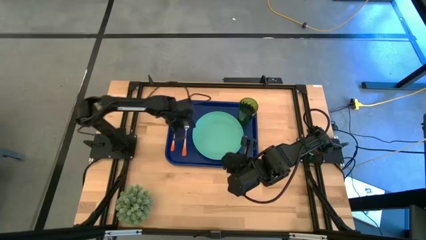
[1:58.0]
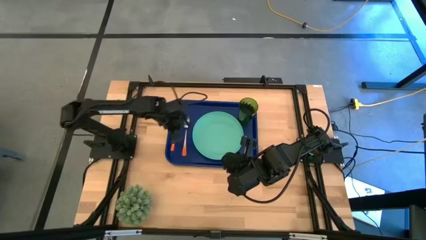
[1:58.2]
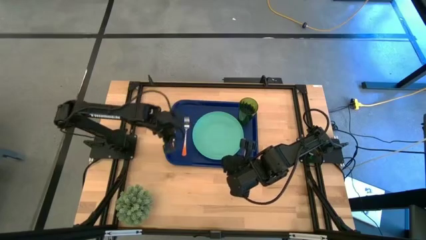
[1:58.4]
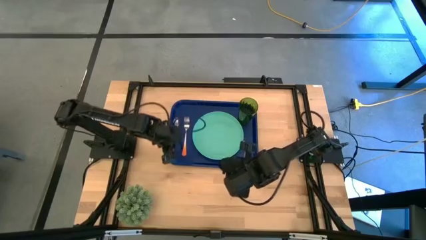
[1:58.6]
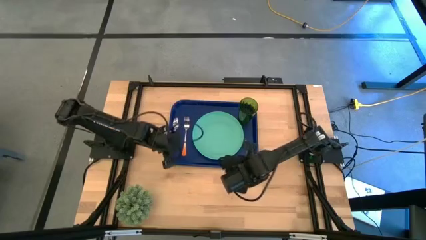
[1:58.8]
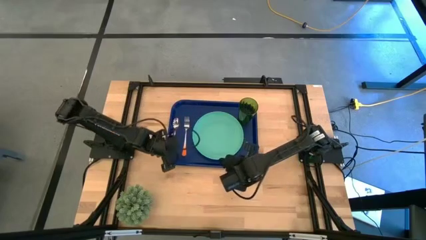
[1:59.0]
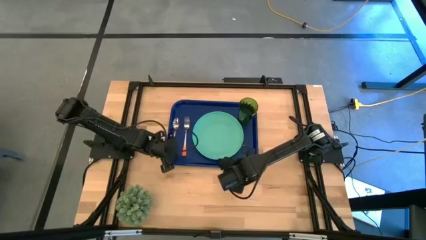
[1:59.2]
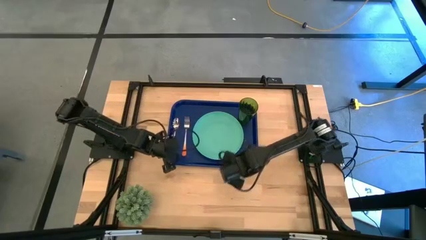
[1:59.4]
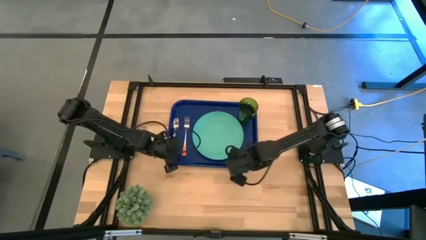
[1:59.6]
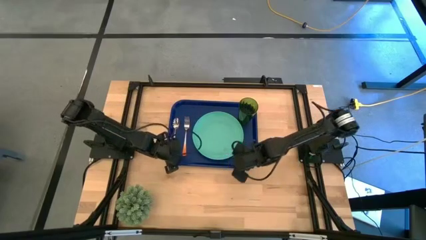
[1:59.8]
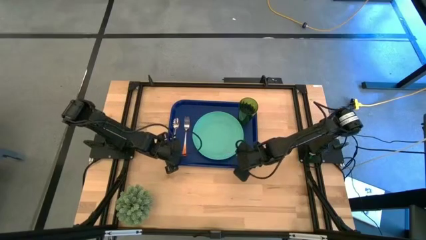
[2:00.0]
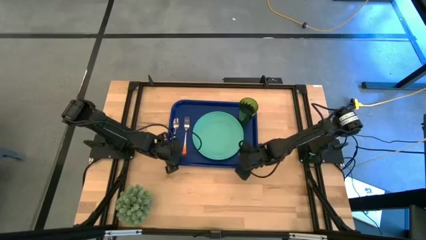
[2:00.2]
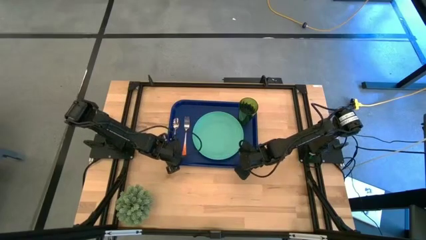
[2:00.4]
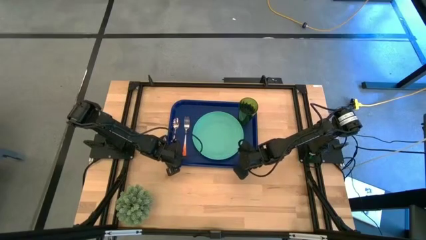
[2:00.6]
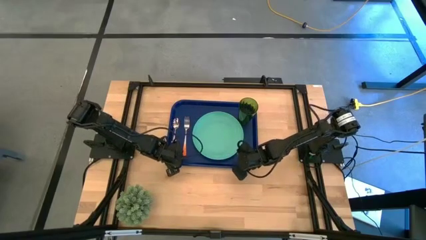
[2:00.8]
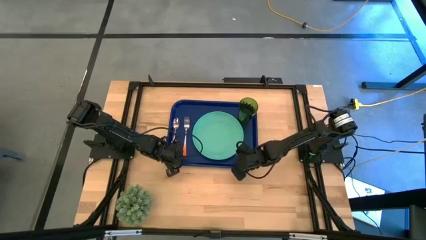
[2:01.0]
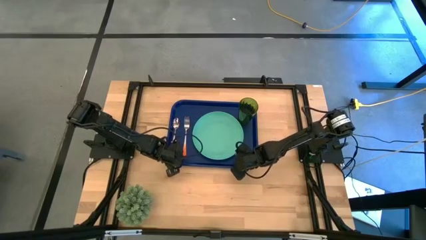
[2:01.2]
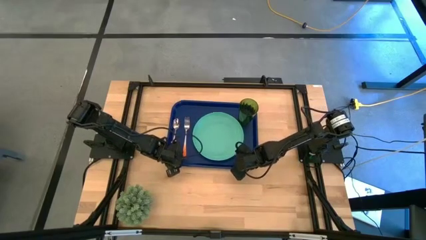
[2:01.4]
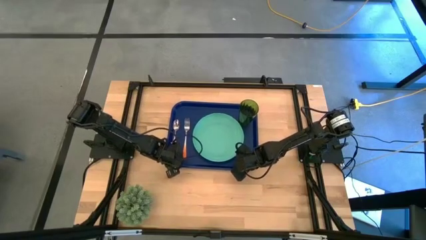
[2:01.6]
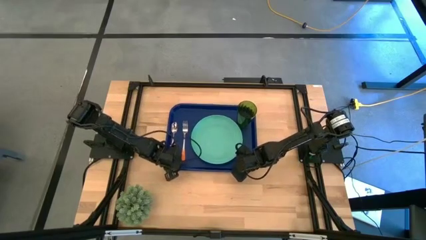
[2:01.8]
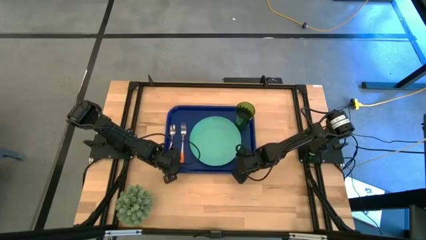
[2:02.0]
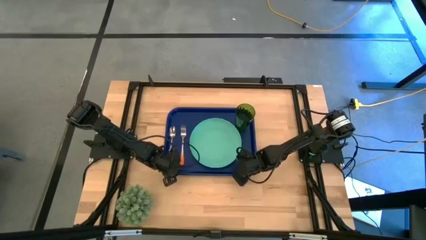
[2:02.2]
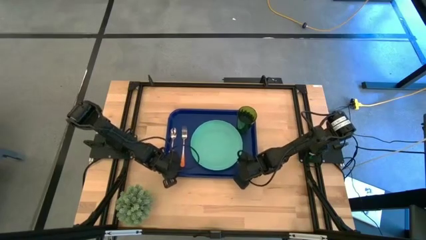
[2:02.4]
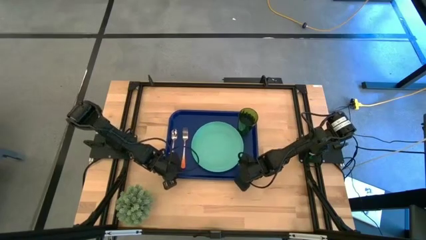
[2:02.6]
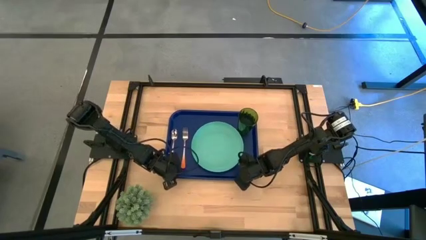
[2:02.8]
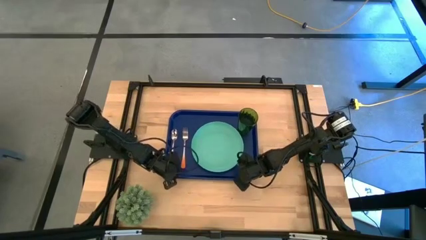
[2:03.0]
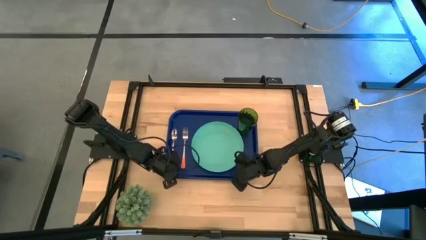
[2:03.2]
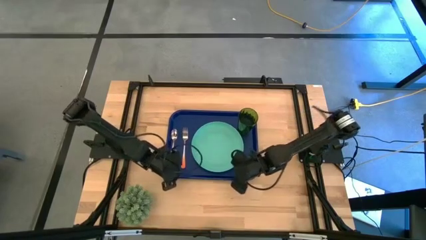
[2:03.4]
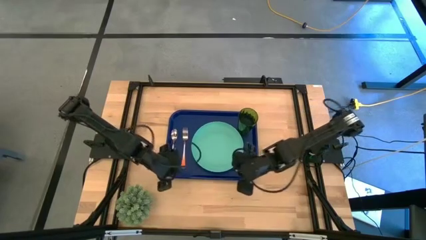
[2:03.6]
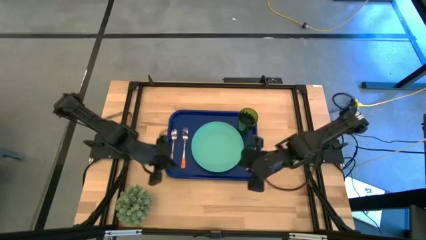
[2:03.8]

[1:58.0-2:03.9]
Task: Pick and place plate/cup/fork/spoon on tray
Adjust the blue serving tray

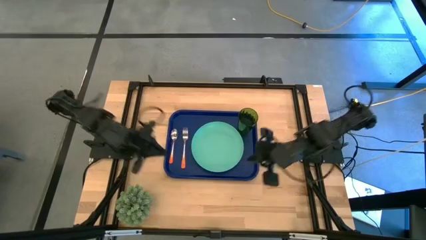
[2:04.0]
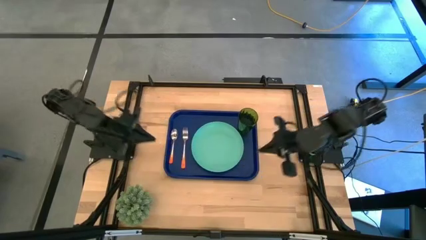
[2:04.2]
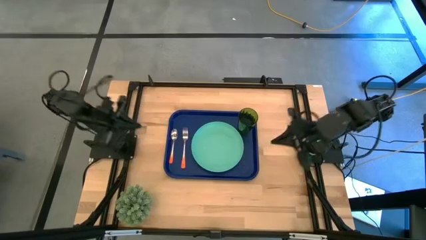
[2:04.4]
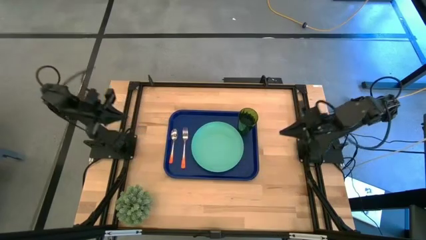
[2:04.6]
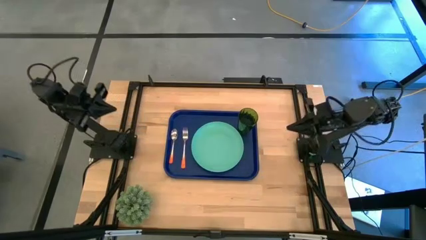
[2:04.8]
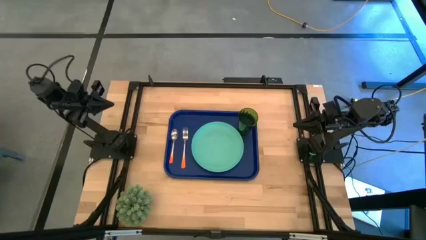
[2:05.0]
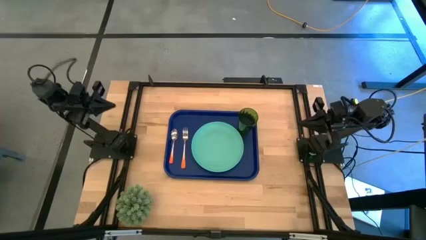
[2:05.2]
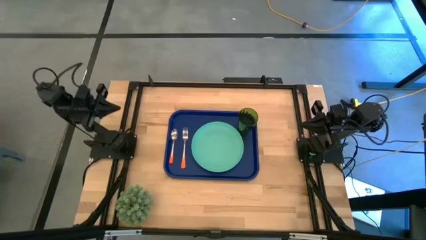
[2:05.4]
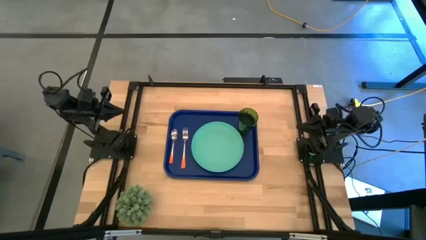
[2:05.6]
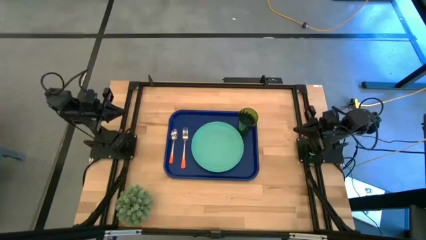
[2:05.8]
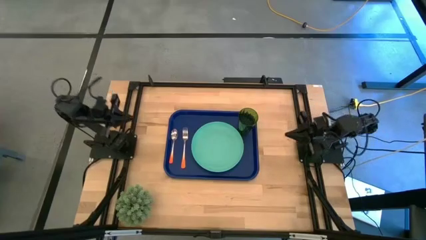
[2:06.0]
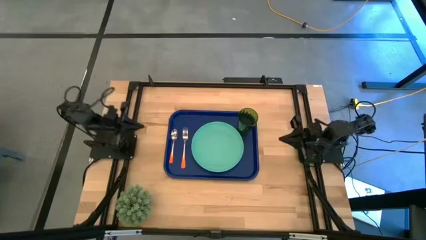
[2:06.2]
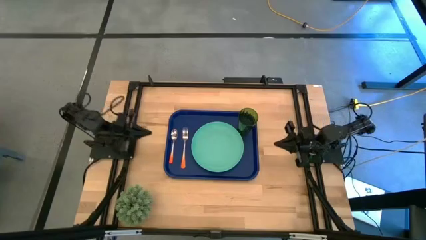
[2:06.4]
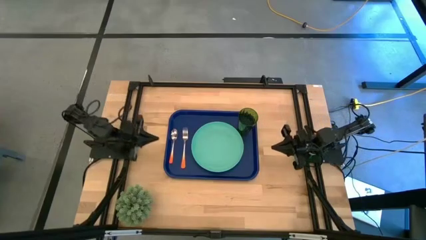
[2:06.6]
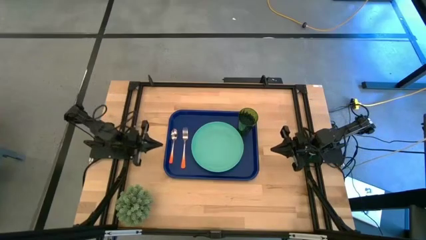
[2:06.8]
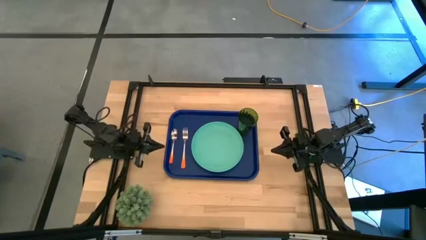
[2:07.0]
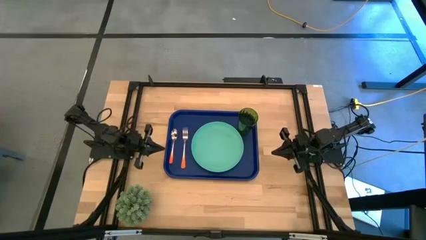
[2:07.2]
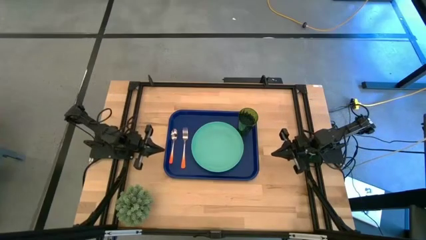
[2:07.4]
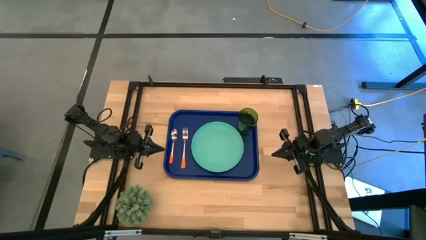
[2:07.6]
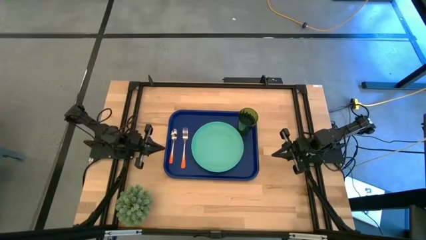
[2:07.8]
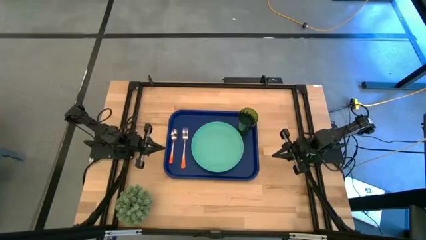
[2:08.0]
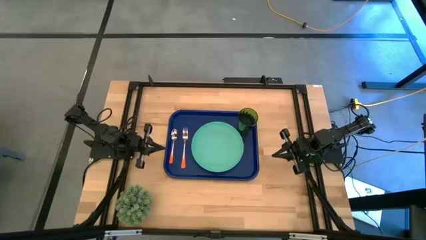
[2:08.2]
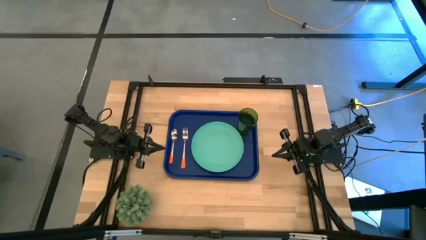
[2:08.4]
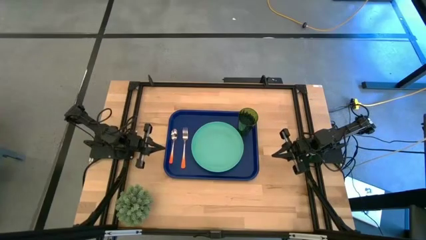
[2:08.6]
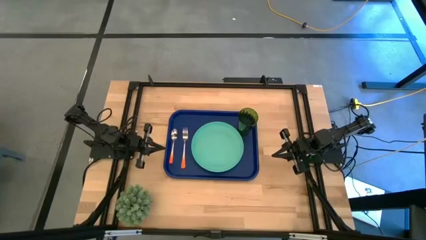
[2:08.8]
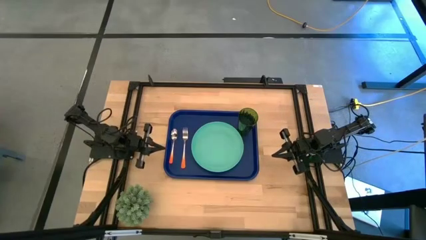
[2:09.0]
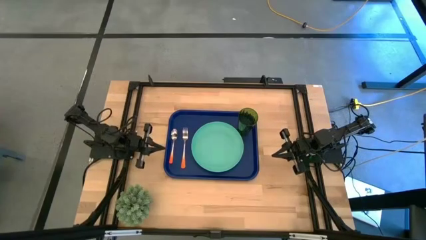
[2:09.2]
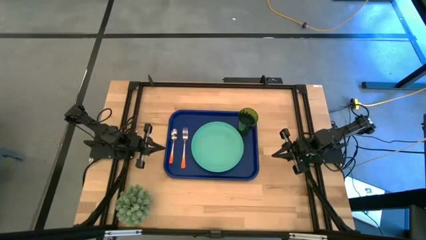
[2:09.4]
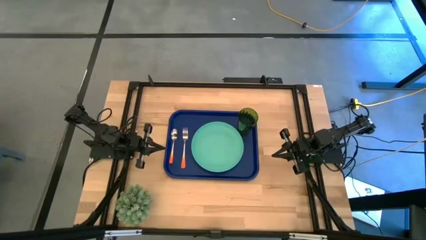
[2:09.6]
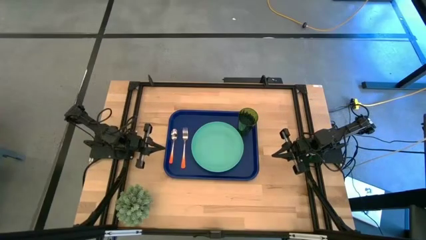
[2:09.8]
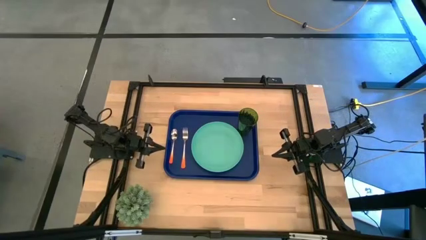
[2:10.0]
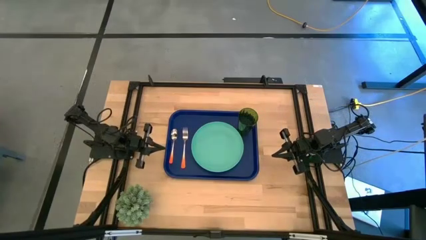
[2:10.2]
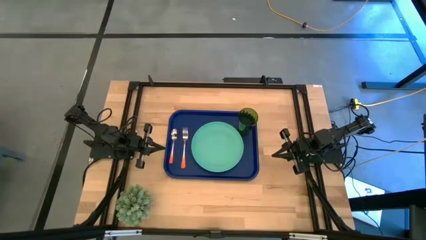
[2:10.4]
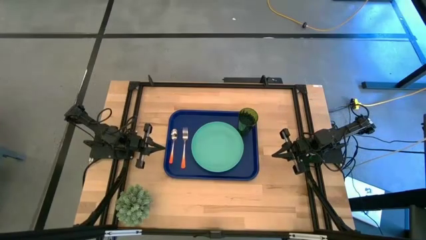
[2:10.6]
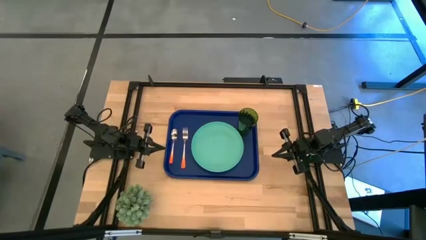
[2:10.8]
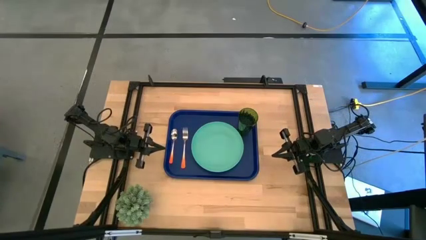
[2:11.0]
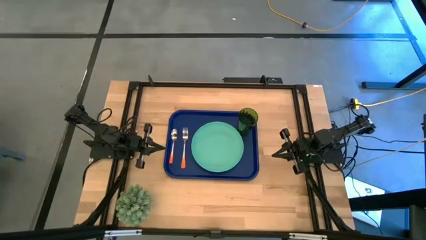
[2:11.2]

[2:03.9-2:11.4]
Return to Home Position

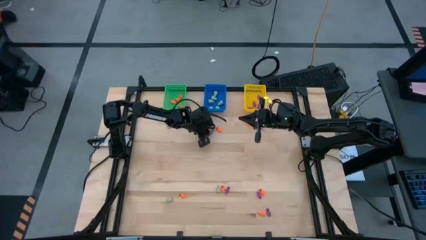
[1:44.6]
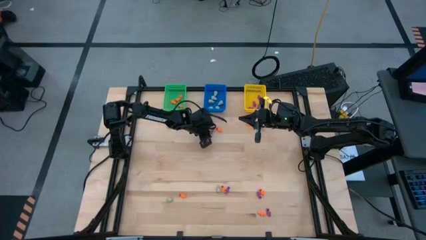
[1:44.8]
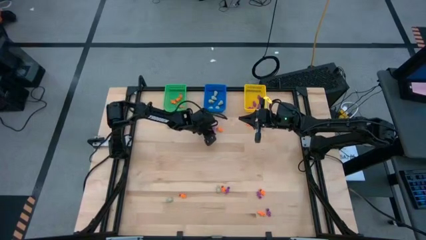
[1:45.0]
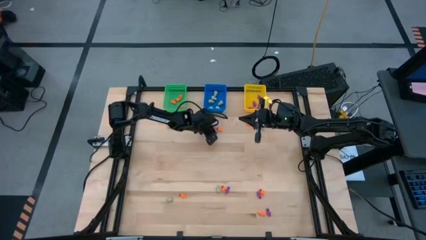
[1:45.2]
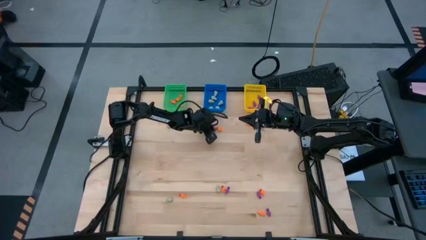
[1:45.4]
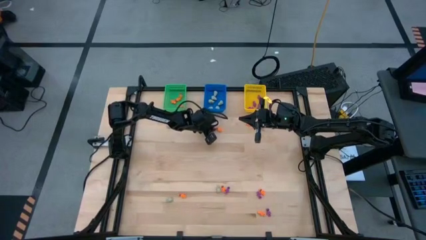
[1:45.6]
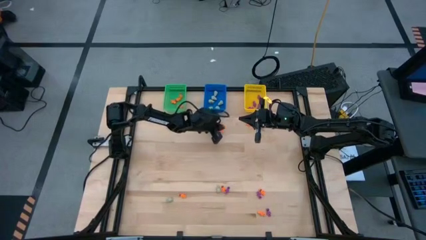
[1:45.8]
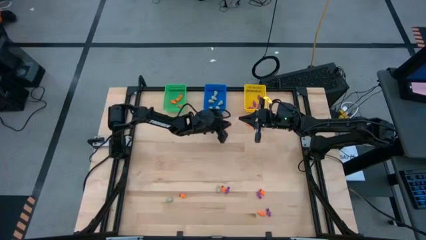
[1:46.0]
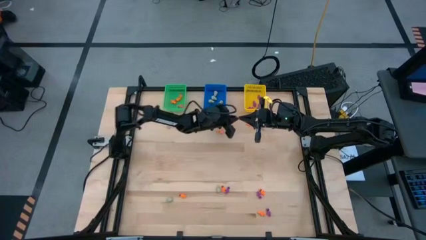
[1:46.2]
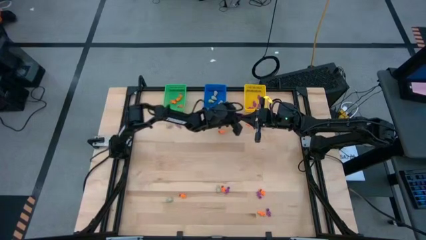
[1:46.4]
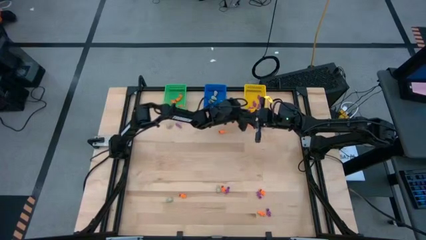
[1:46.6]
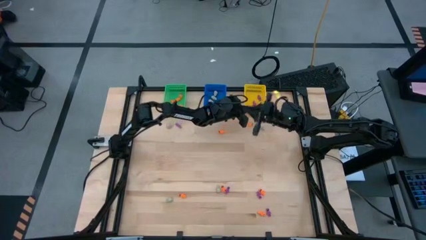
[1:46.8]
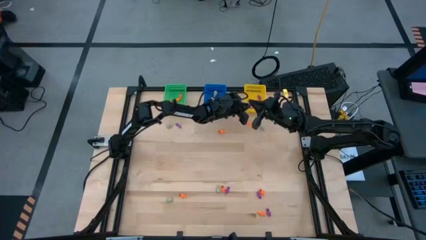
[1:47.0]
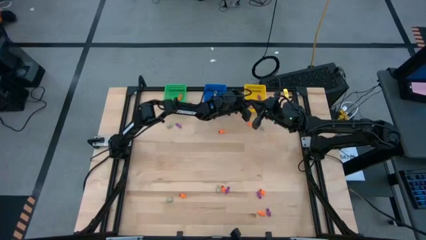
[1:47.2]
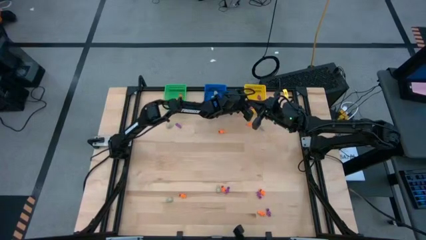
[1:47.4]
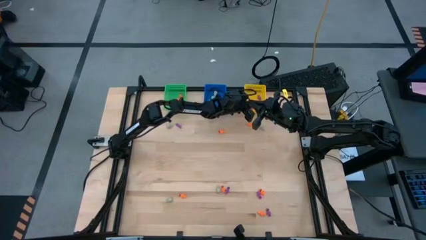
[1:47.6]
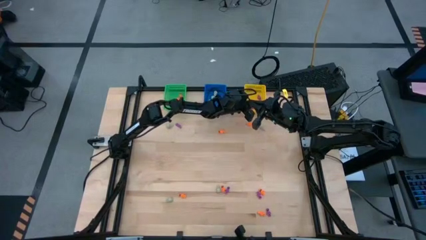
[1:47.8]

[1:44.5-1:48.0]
Task: Sort Halloween decoration
Put the purple skeleton toy into the yellow bin

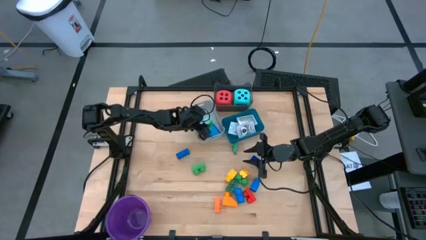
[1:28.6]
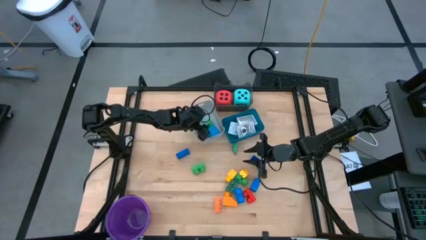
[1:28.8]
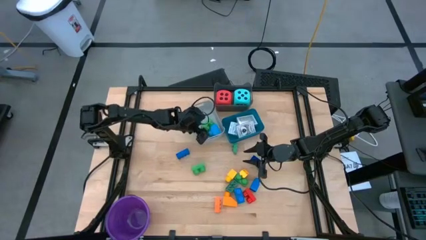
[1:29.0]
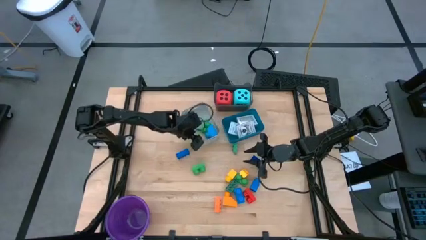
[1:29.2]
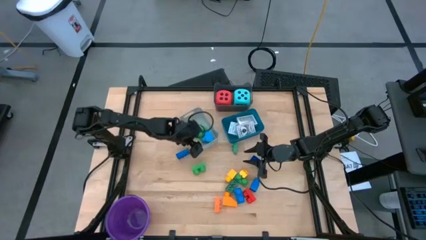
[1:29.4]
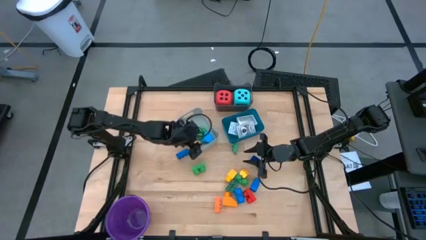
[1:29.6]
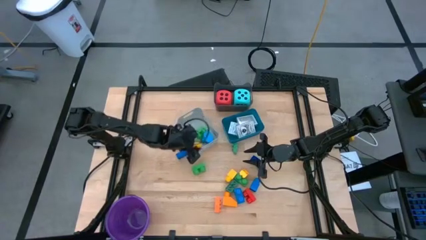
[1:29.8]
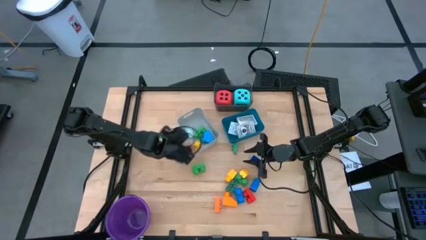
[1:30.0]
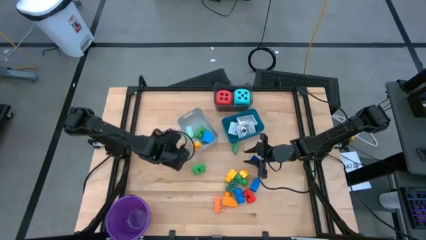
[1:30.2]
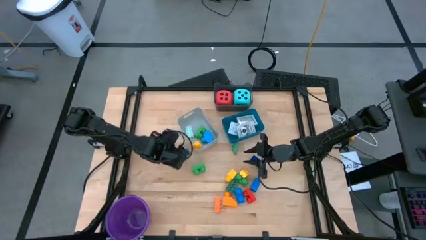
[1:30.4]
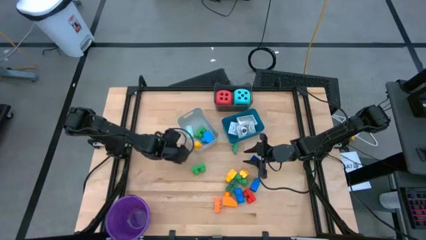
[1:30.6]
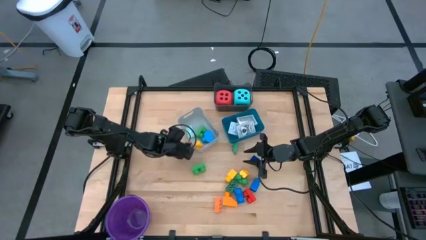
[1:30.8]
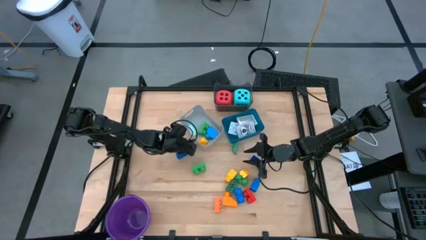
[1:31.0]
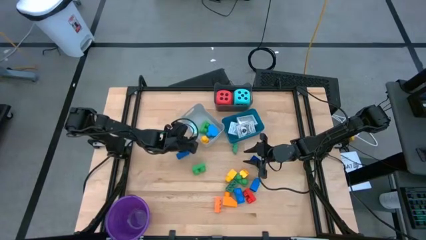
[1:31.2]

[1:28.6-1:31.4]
Task: Pick & Place Toys
Adjust the gray bin on the table
